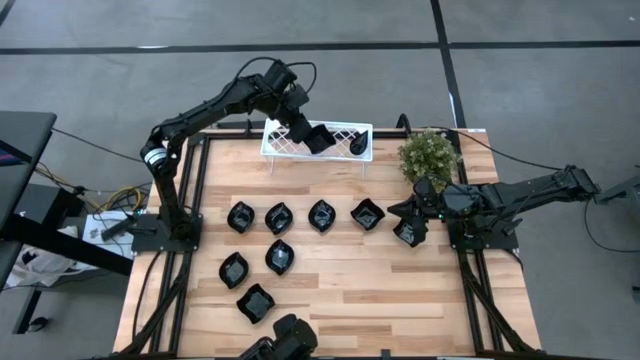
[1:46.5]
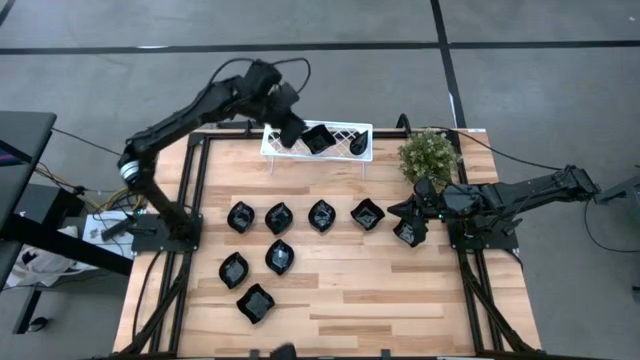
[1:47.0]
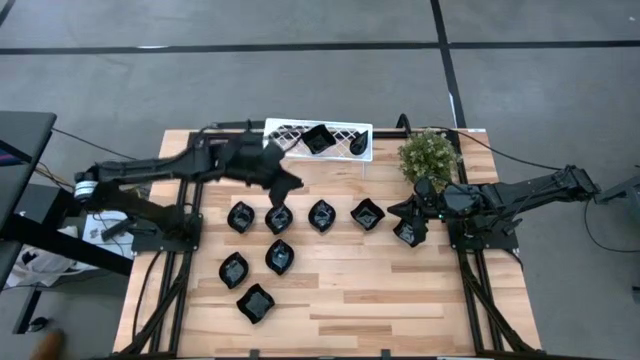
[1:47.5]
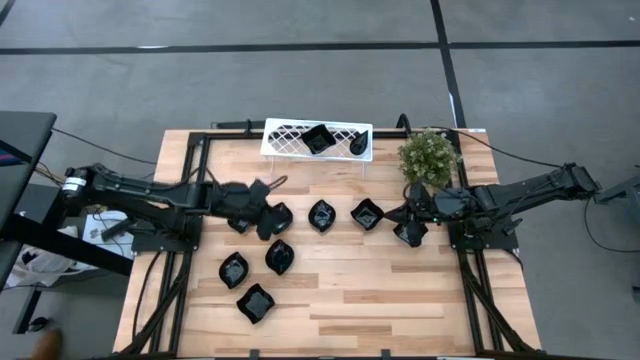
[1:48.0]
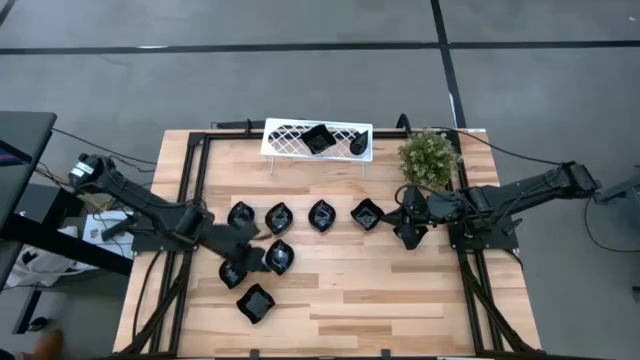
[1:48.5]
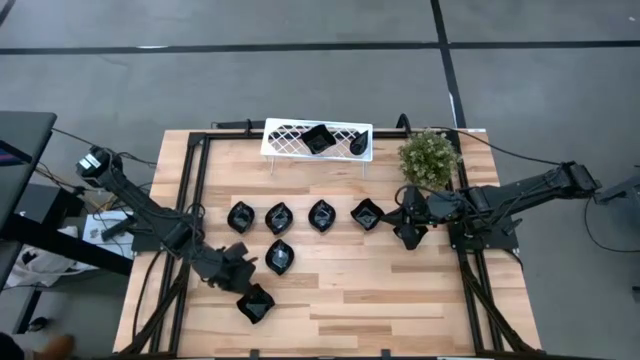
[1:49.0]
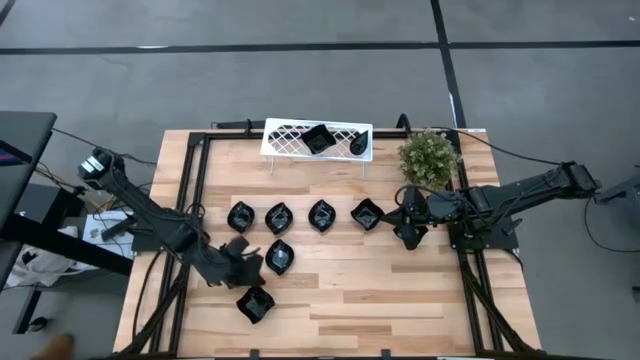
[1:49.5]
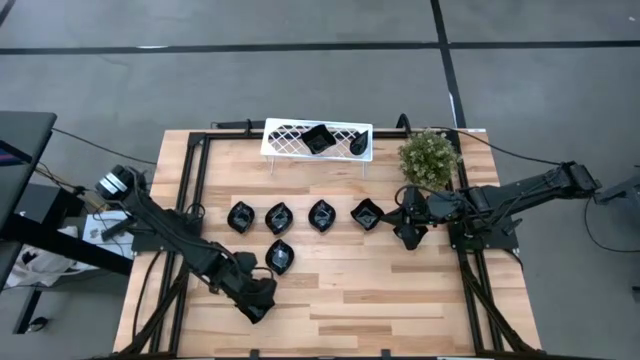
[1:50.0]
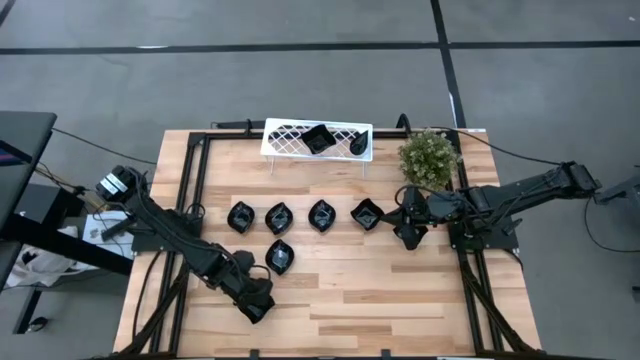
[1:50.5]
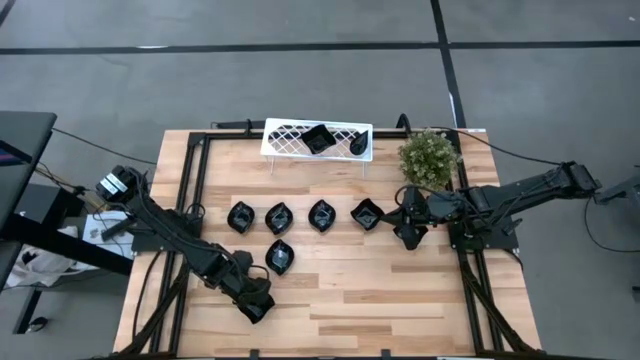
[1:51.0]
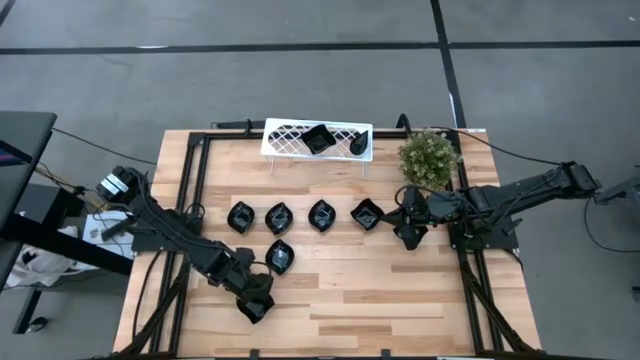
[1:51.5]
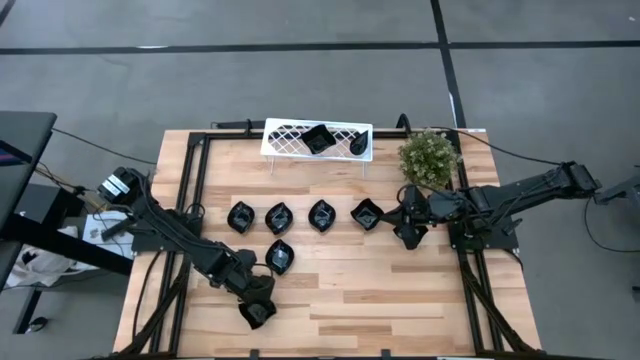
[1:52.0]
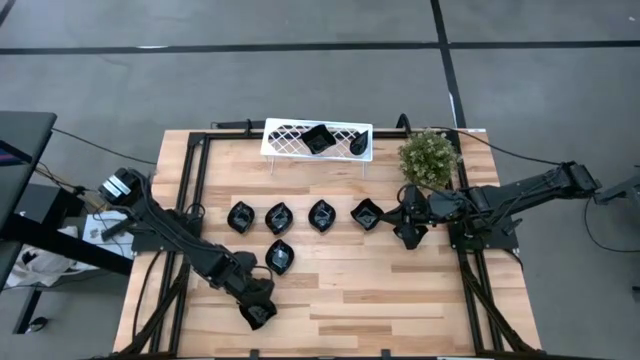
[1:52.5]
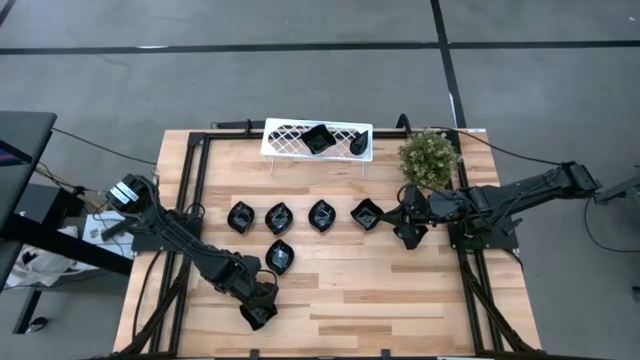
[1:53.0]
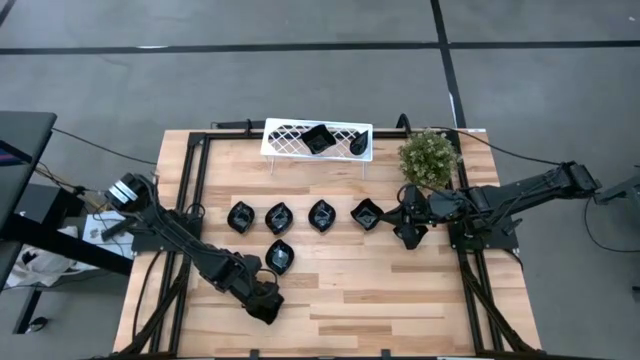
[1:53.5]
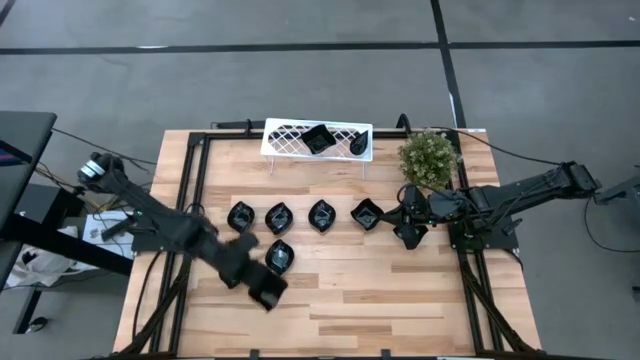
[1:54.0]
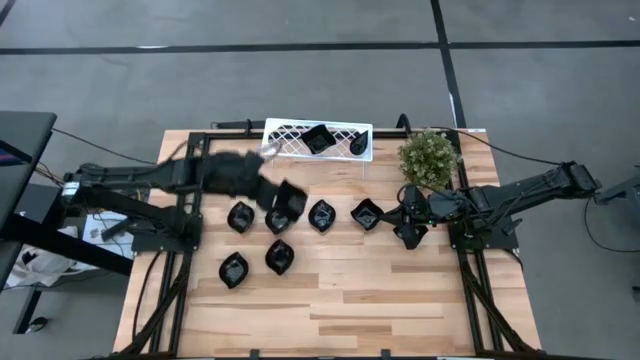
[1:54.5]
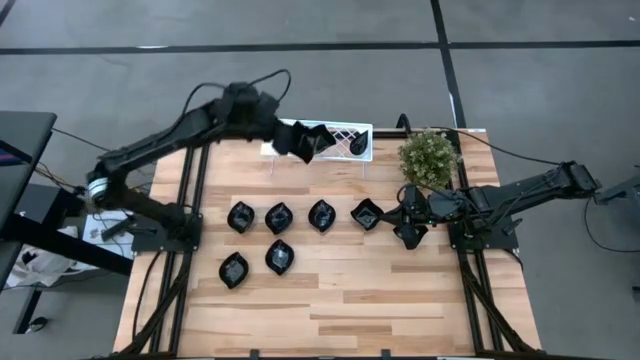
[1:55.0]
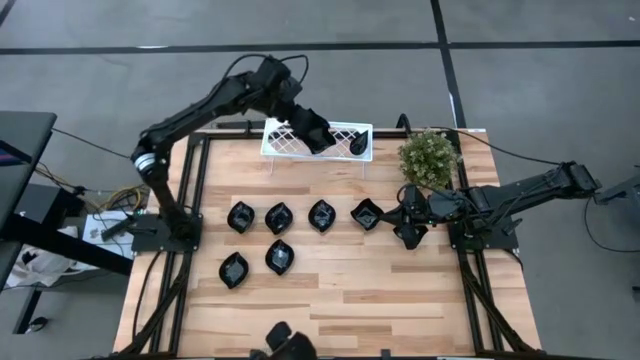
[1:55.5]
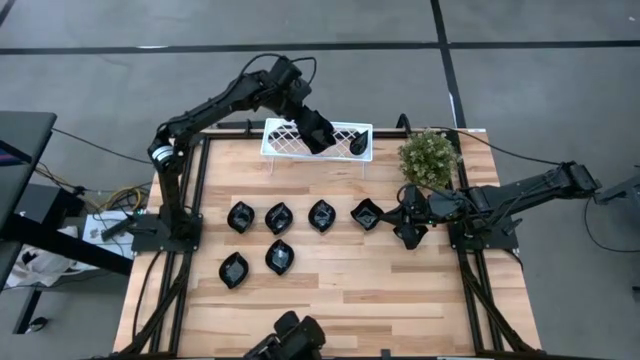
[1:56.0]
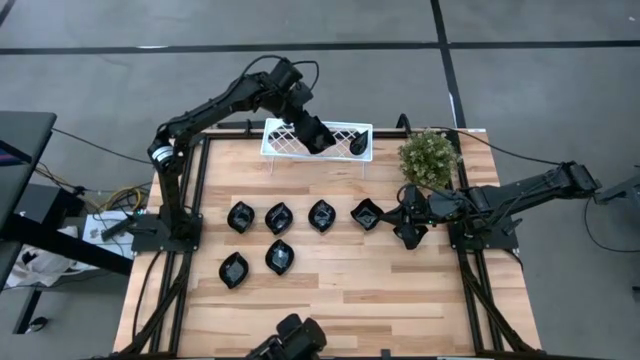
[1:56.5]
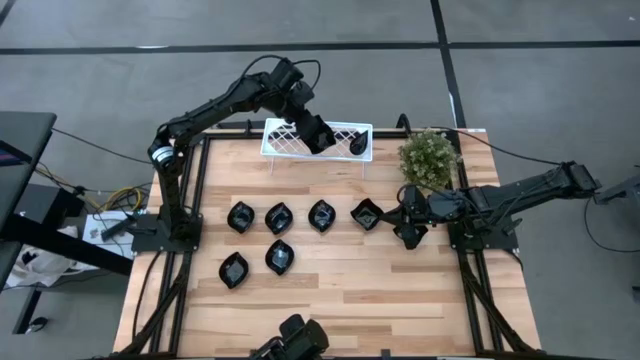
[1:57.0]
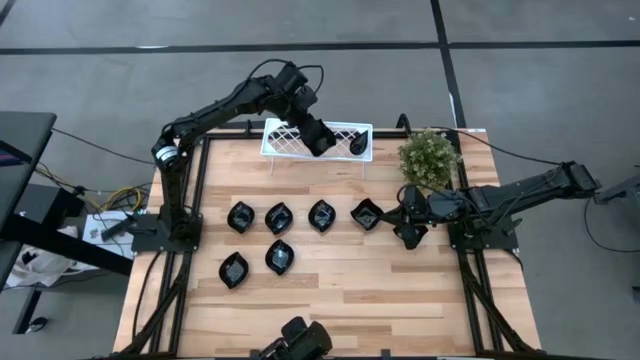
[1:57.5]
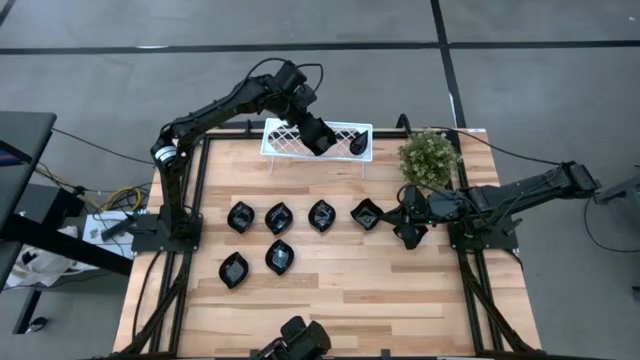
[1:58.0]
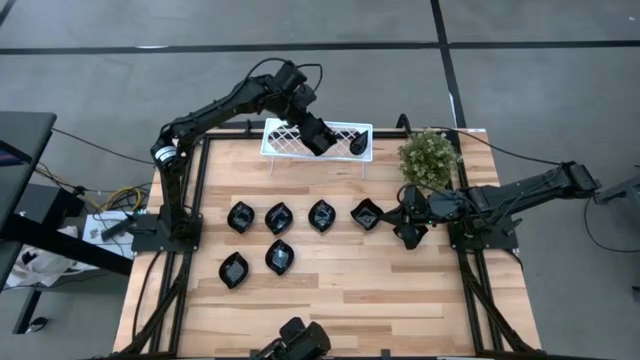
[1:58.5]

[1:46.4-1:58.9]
Task: Pick & Place Mini shaped plates
Stack the black distorted square plate on top of the black distorted square plate on the shelf

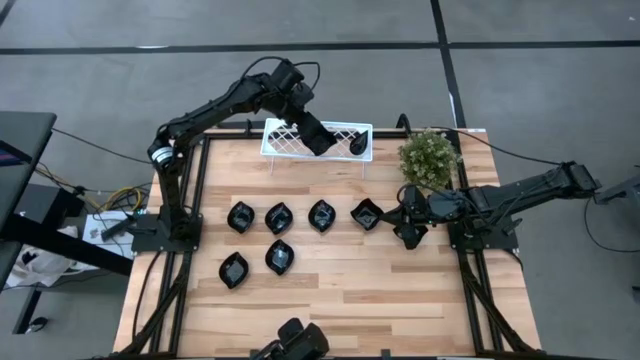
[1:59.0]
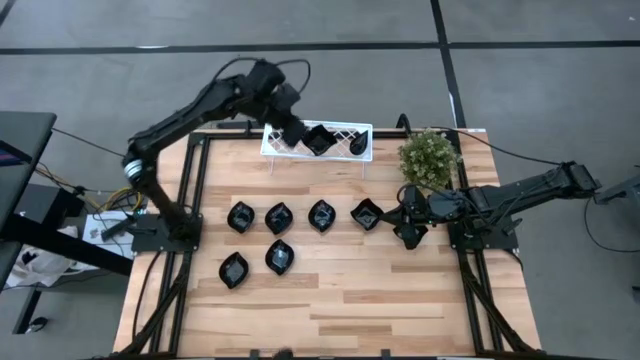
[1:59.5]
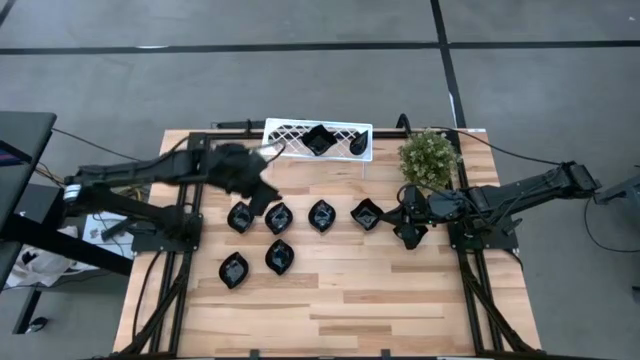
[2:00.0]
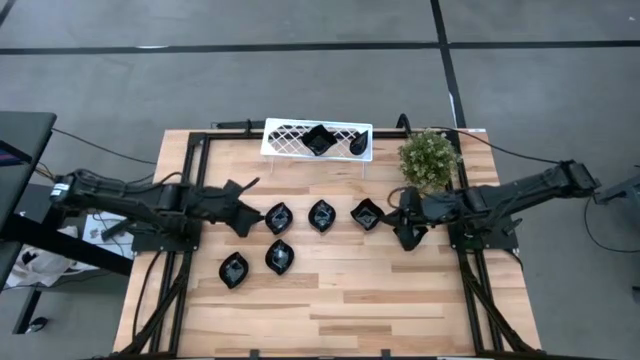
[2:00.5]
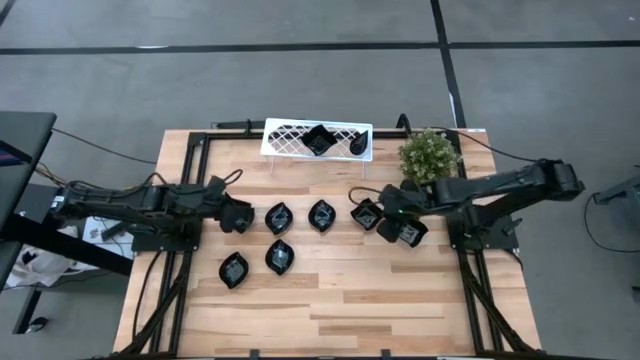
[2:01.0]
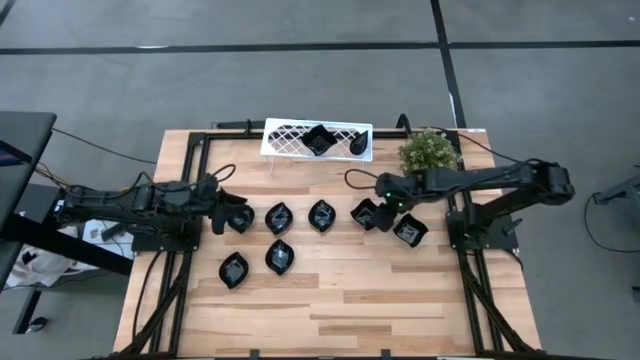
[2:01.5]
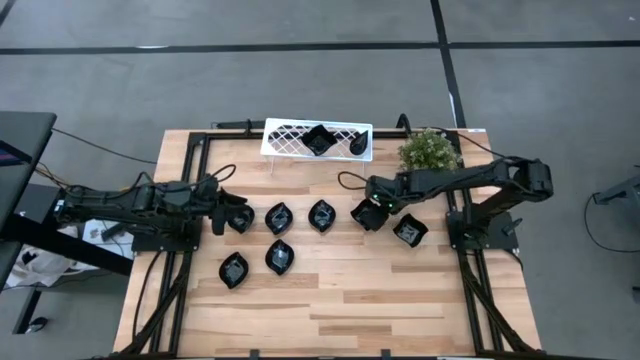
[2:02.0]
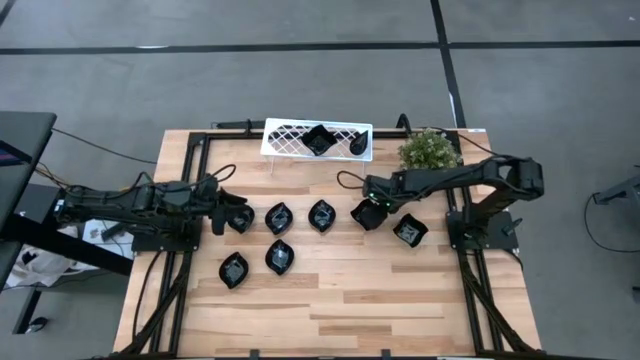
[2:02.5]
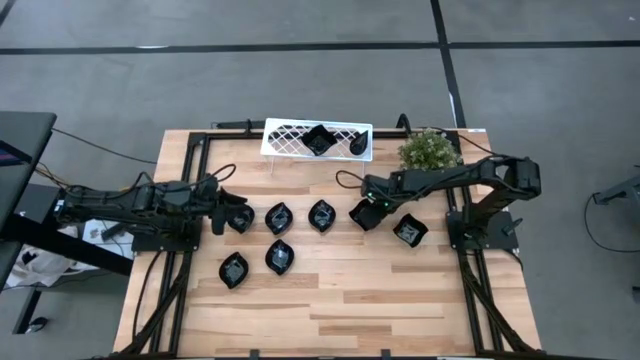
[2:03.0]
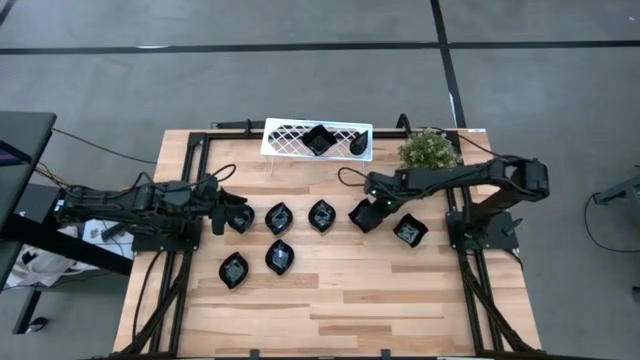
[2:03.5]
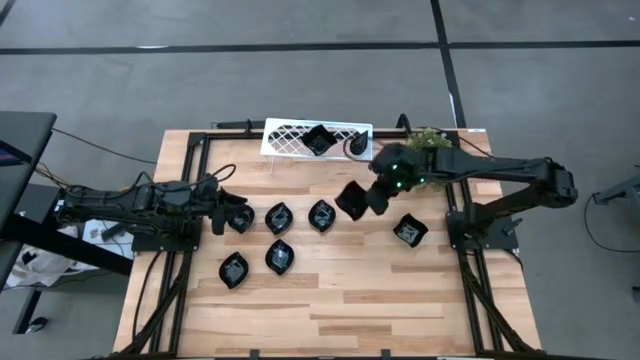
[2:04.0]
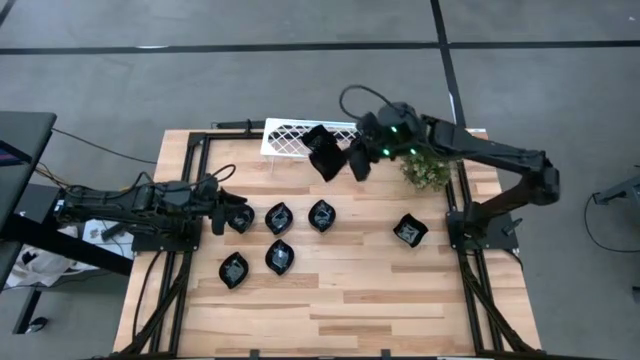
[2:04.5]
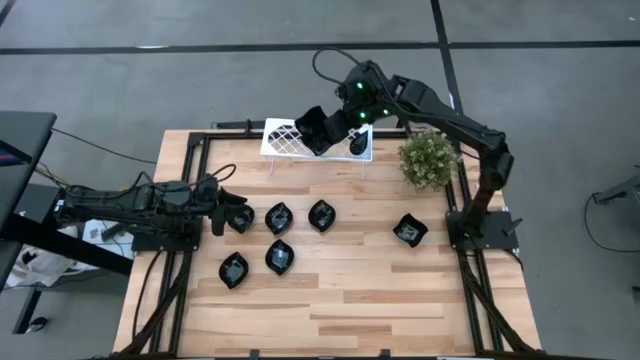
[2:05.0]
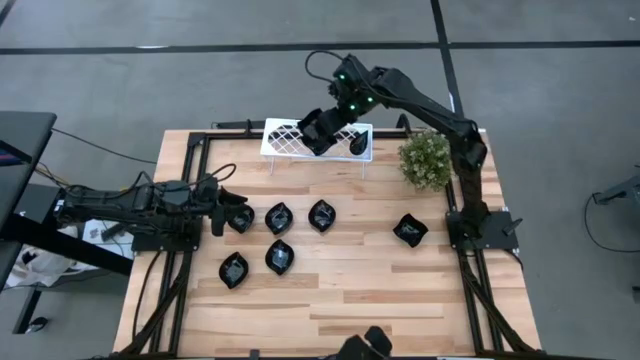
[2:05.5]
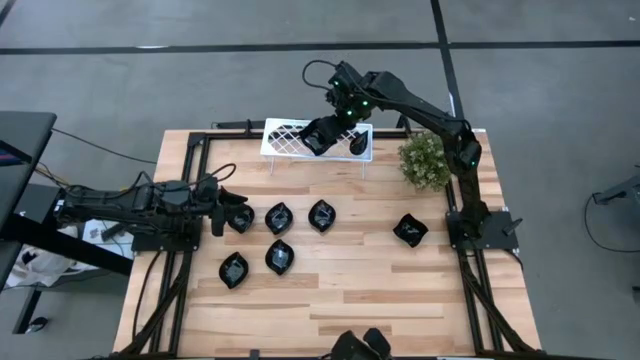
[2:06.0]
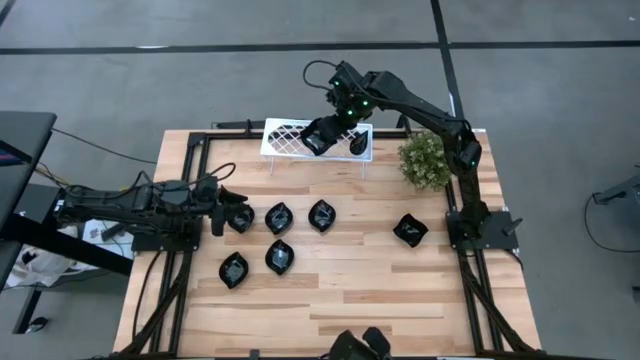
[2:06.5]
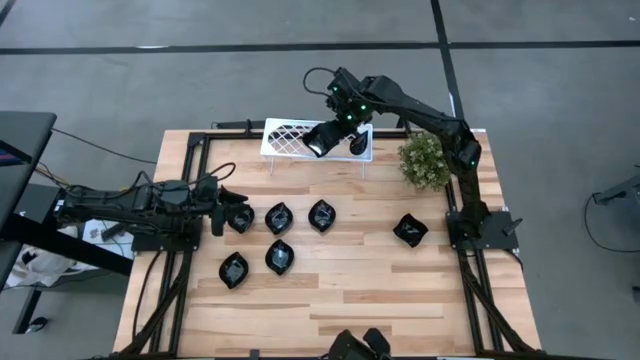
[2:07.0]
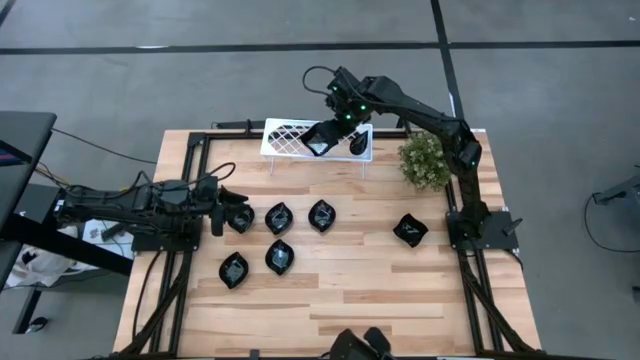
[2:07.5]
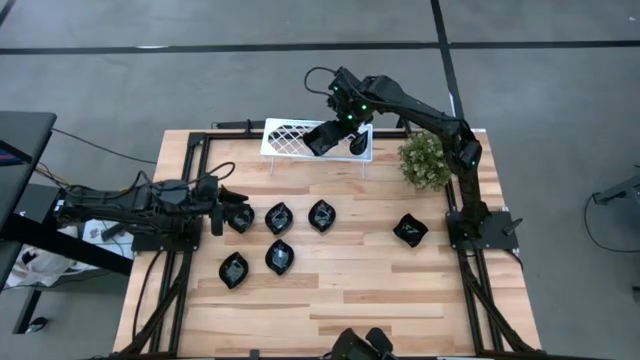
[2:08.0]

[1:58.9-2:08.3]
Stack the black distorted square plate on top of the black distorted square plate on the shelf
